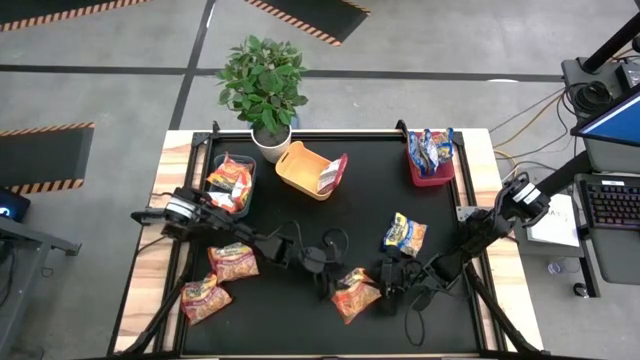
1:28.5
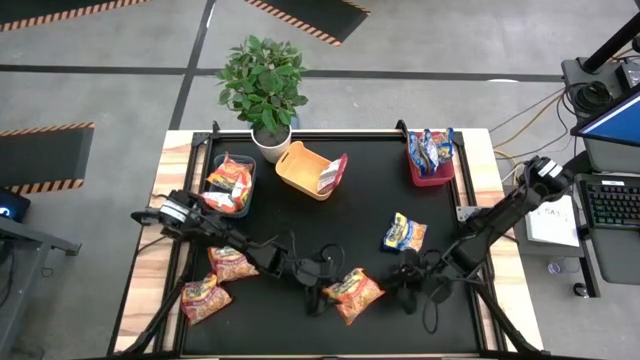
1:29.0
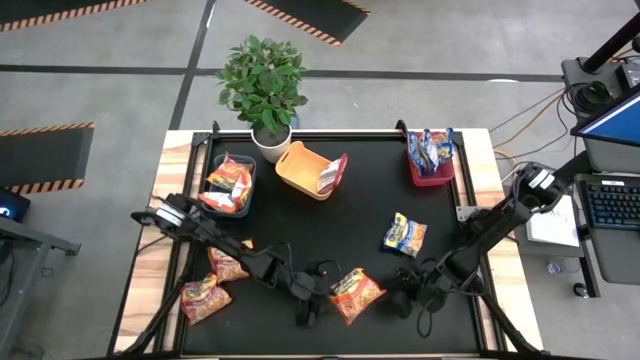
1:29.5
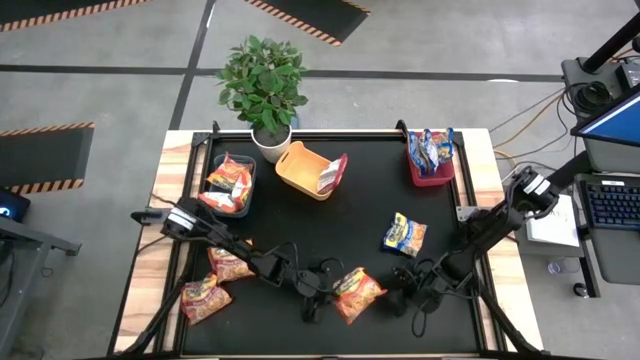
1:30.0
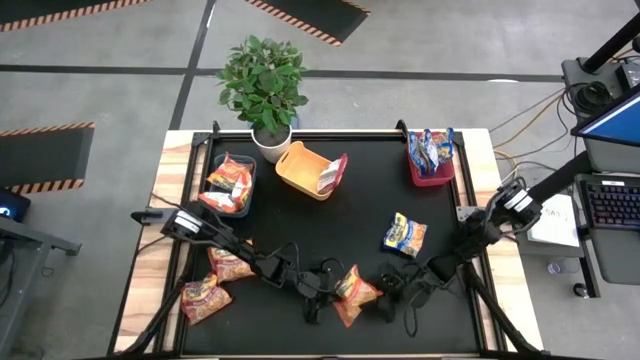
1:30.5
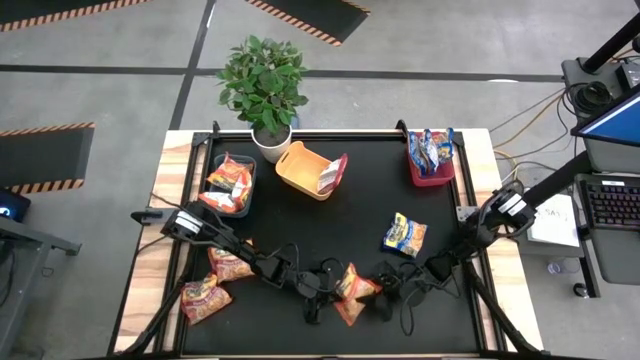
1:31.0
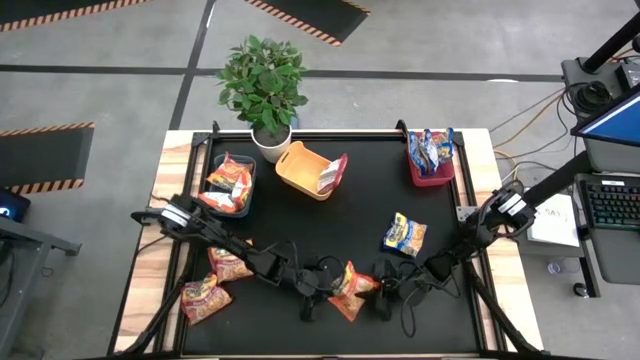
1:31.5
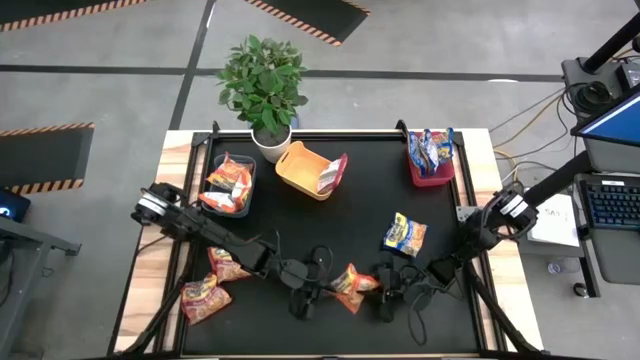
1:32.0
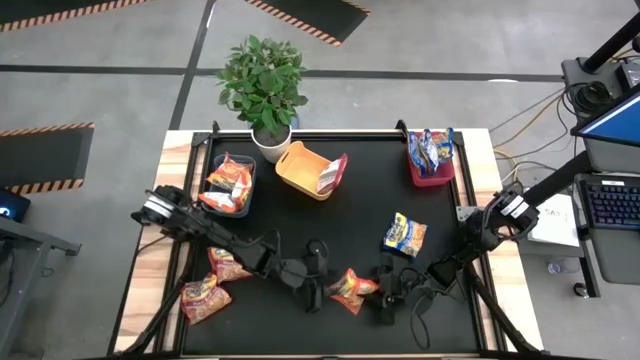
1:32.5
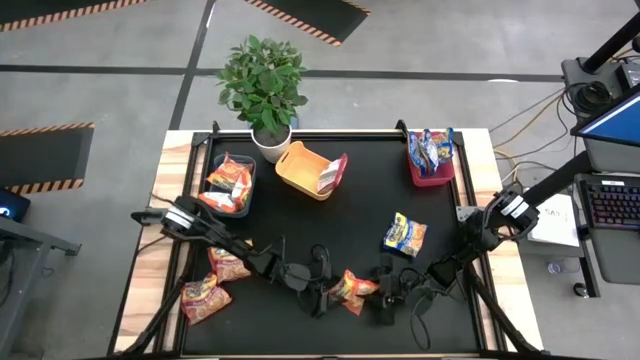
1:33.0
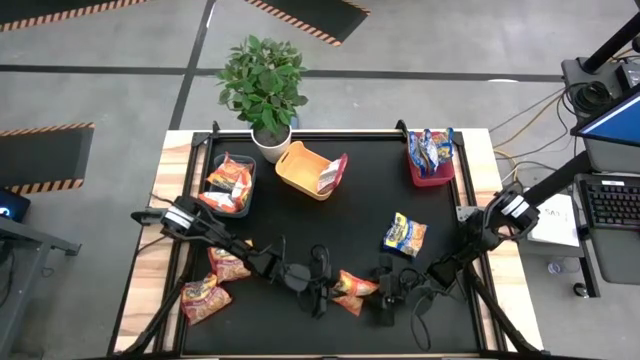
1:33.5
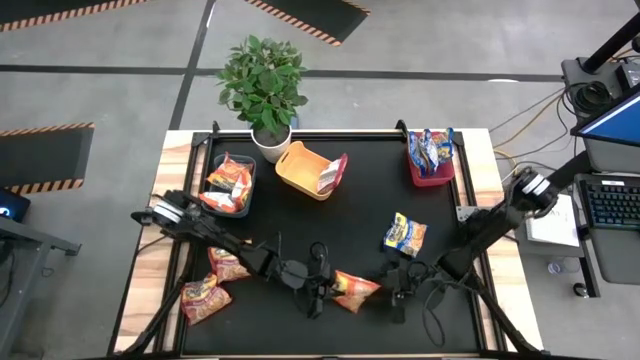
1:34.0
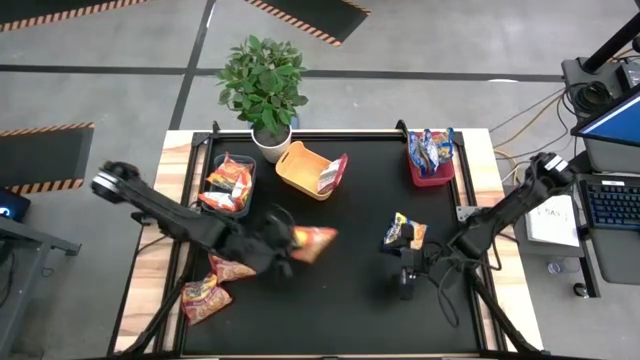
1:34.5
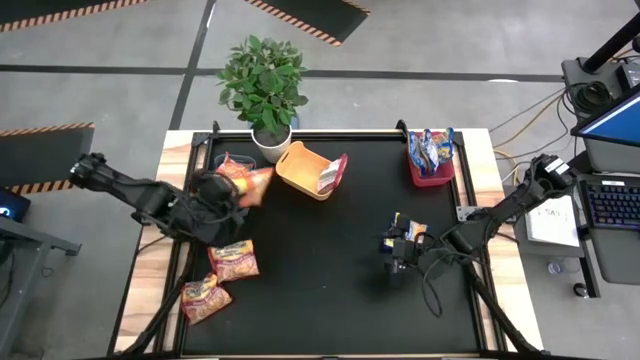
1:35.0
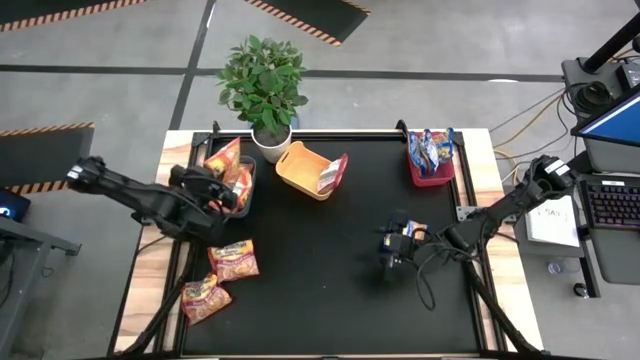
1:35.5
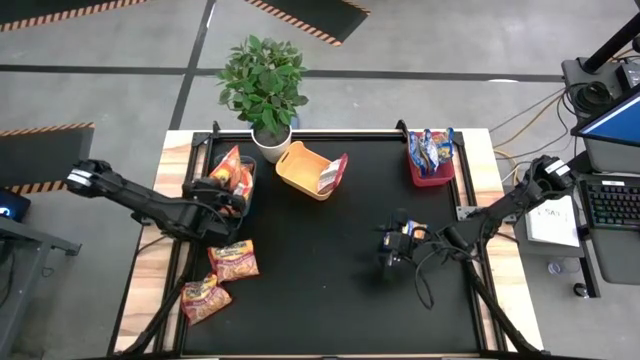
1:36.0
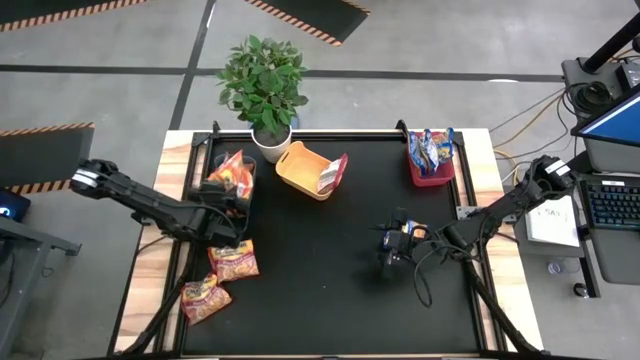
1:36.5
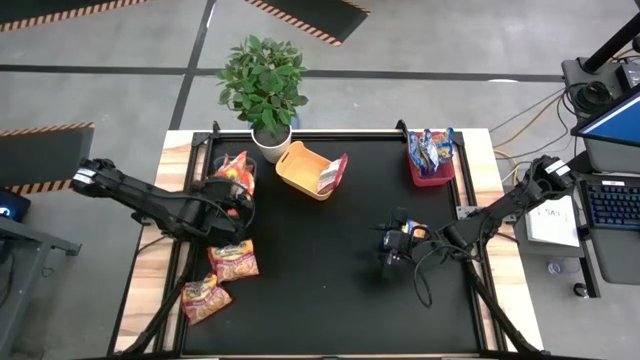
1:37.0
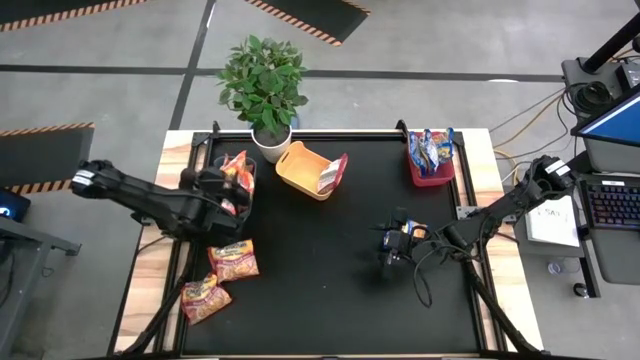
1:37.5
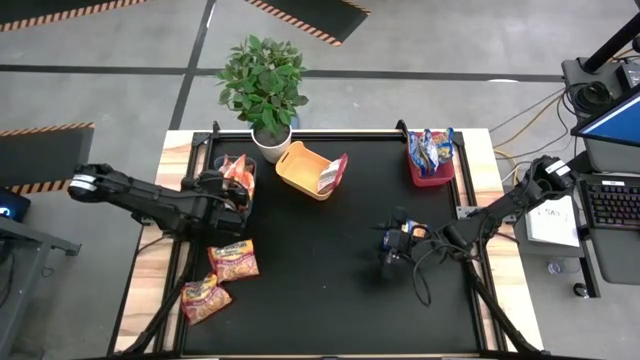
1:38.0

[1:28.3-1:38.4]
Task: Sort Maruchan noodles
Put the orange noodle pack into the blue bin

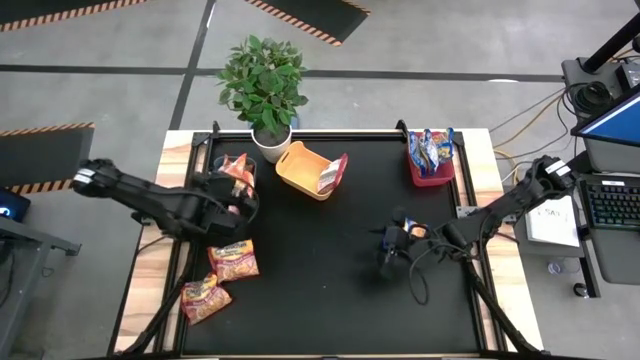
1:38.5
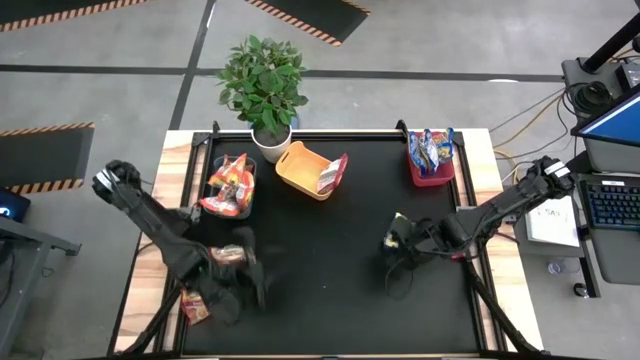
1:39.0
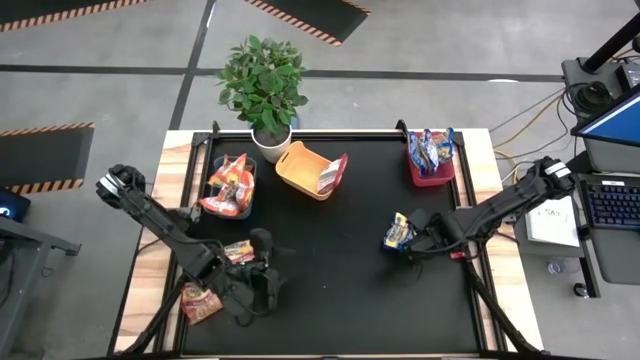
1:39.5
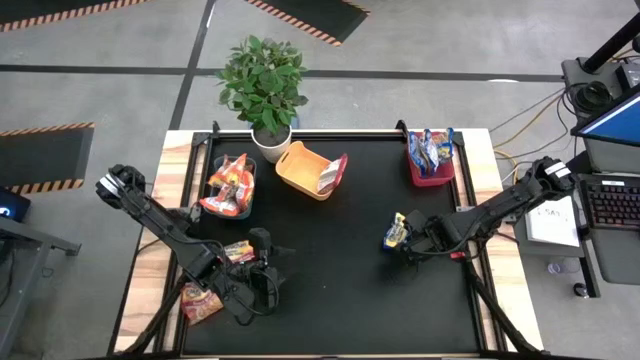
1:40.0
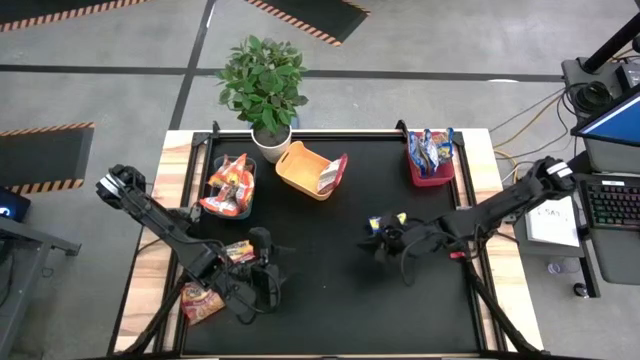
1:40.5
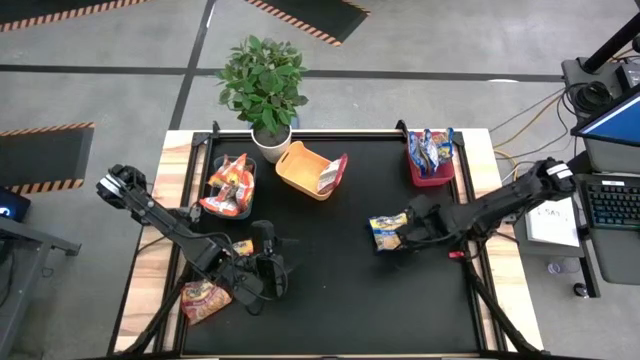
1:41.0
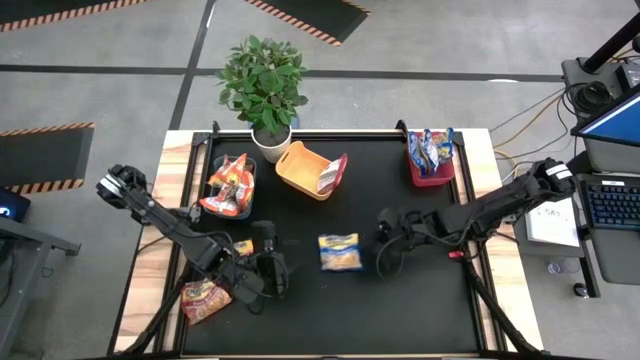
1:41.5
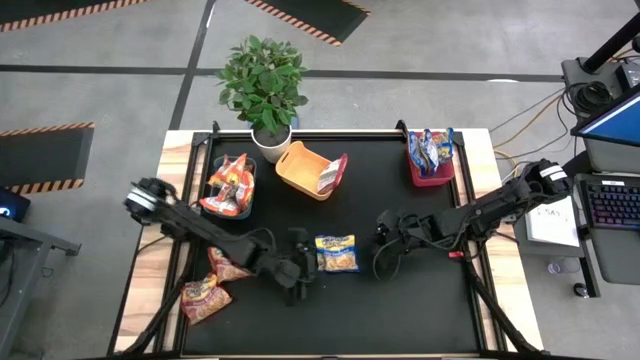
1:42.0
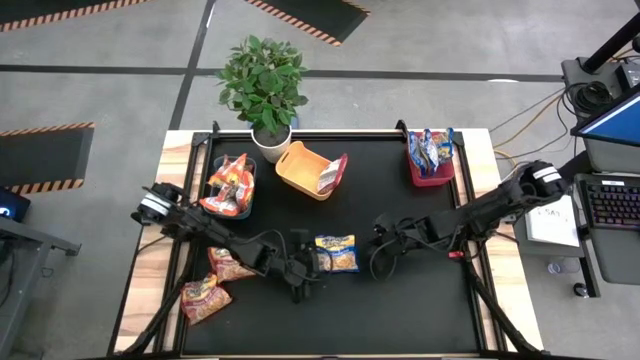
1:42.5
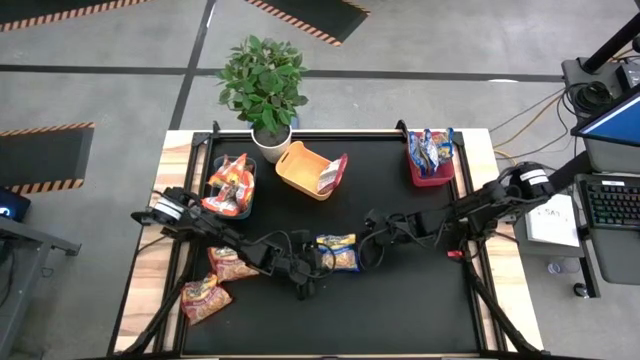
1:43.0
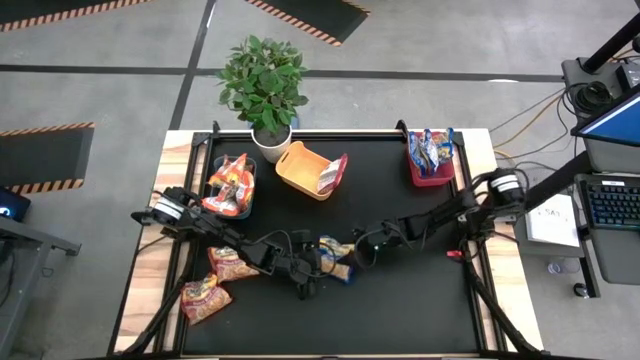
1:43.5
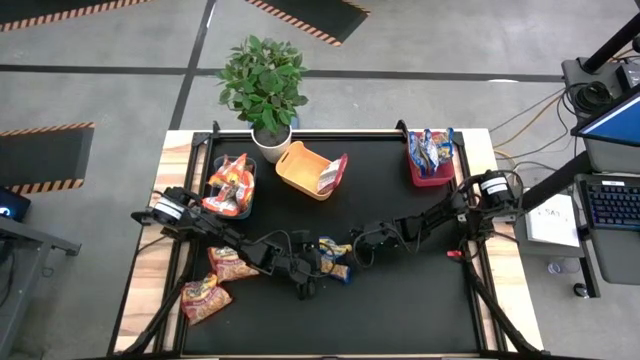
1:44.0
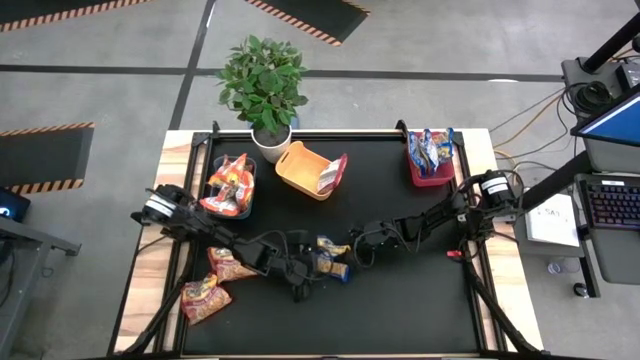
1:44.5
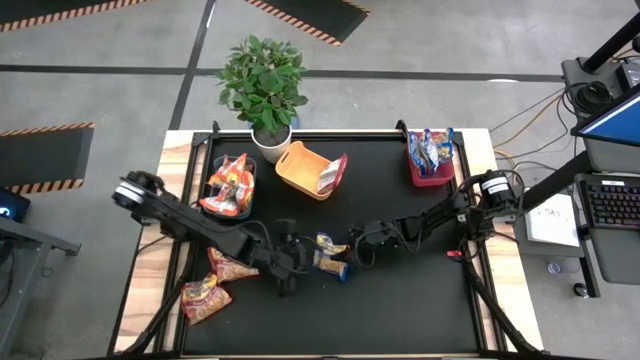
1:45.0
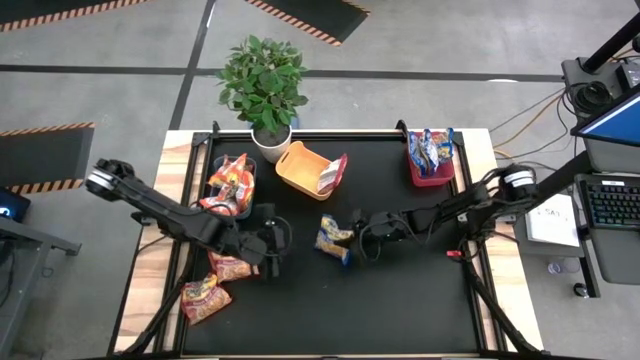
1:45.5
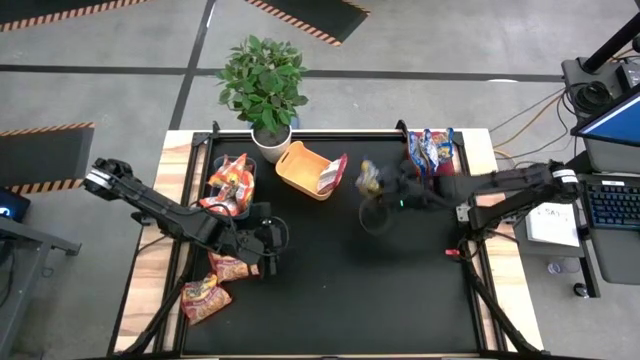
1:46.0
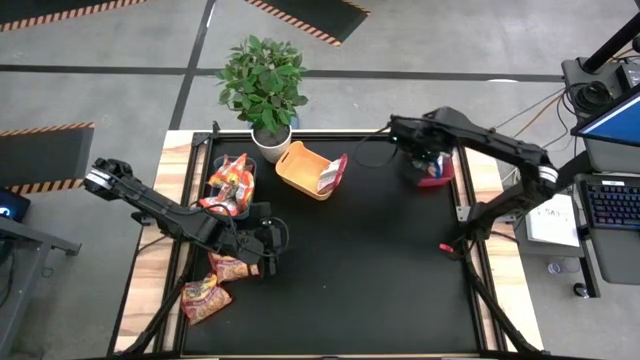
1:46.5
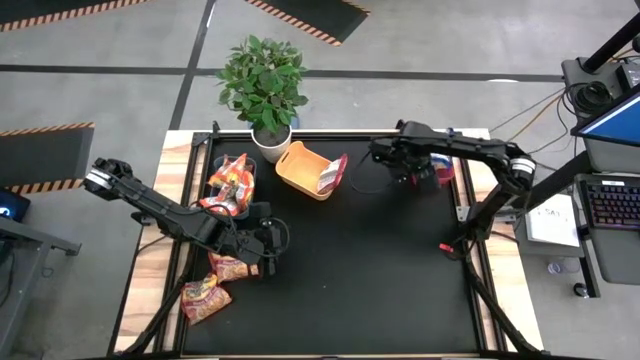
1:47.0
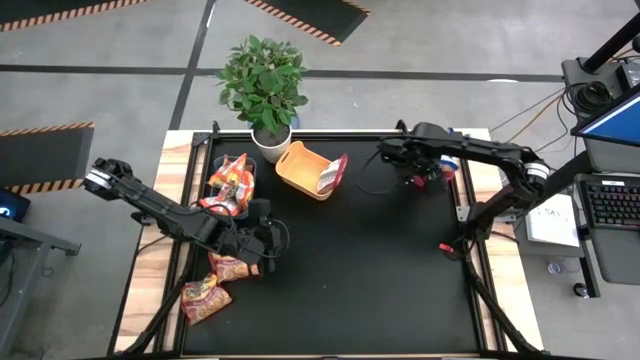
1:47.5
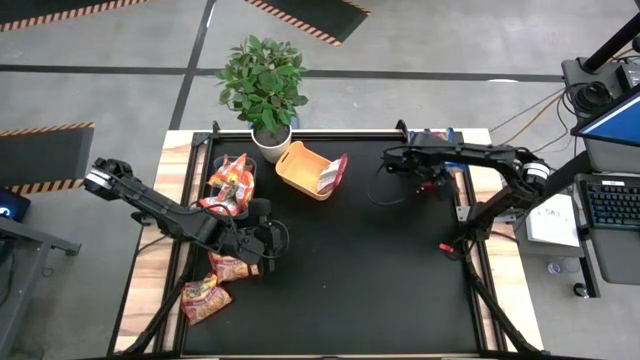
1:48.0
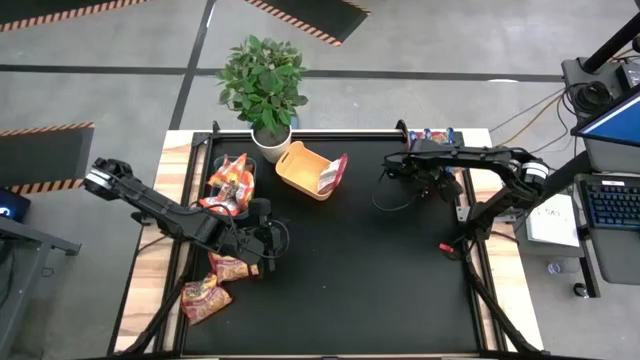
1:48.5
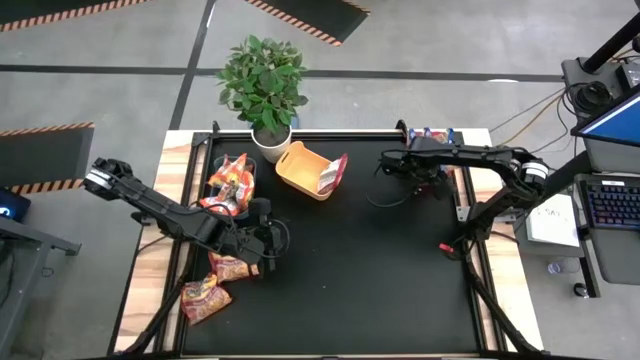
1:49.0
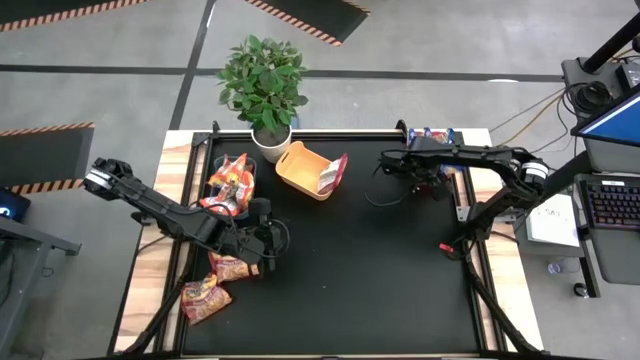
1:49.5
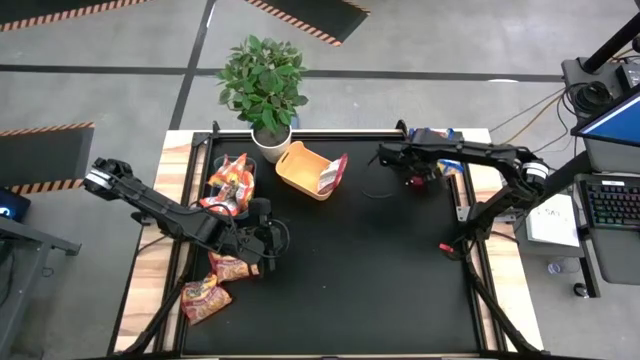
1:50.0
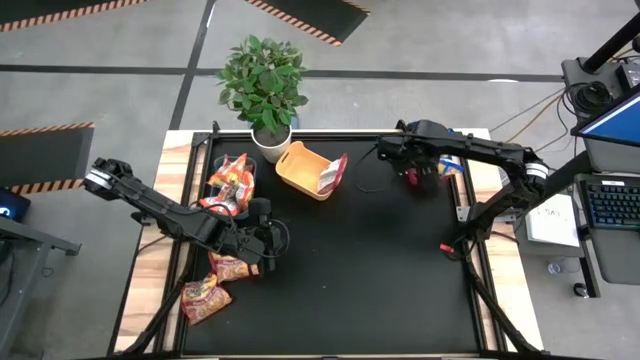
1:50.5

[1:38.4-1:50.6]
Put the blue noodle pack into the red bin
